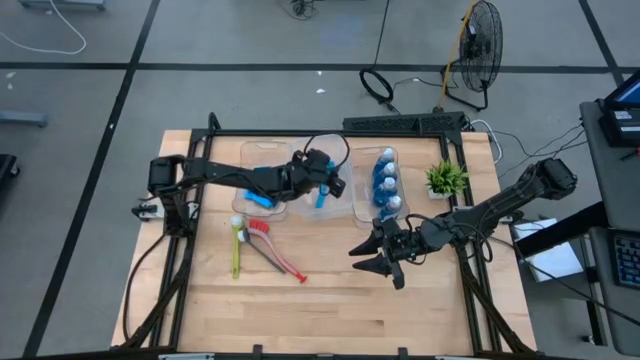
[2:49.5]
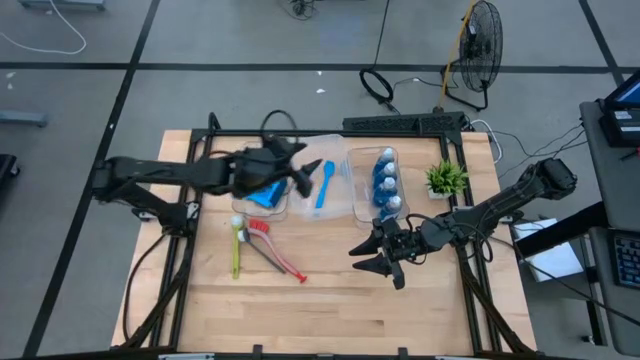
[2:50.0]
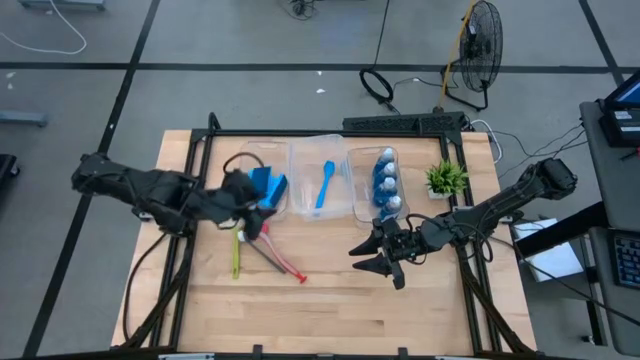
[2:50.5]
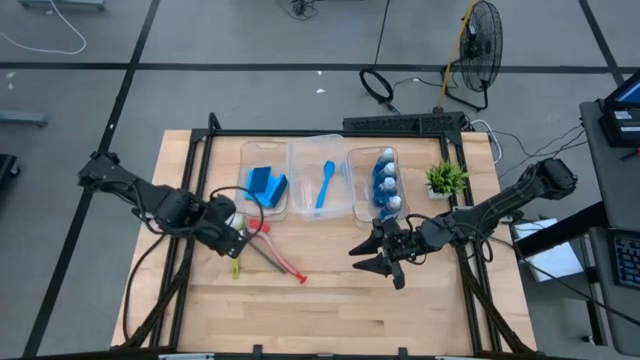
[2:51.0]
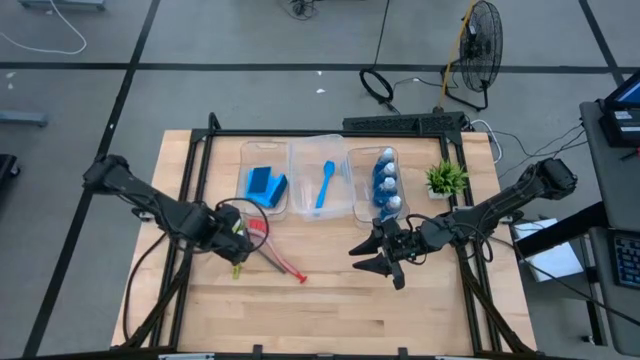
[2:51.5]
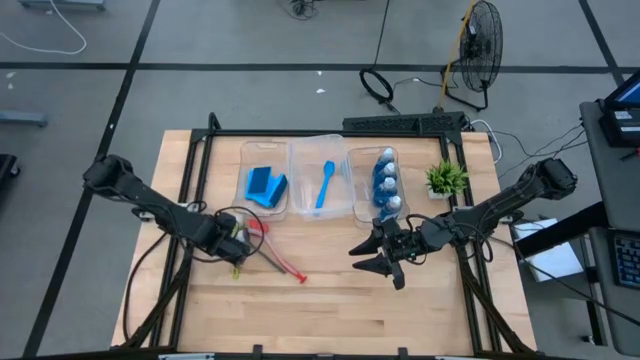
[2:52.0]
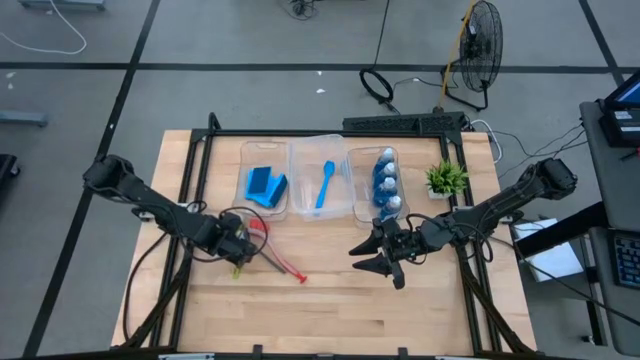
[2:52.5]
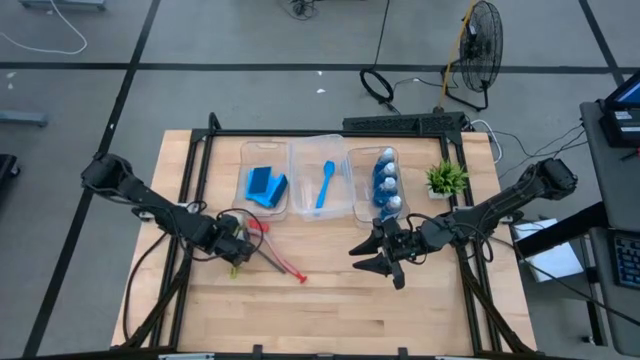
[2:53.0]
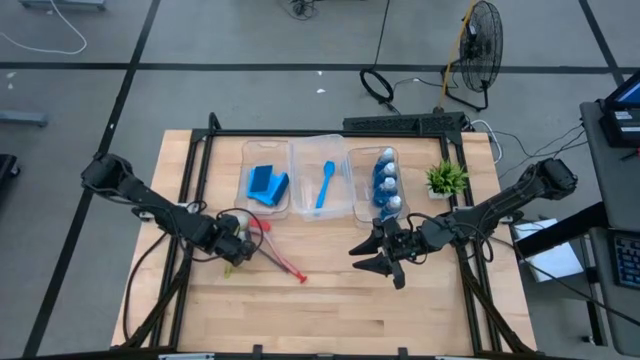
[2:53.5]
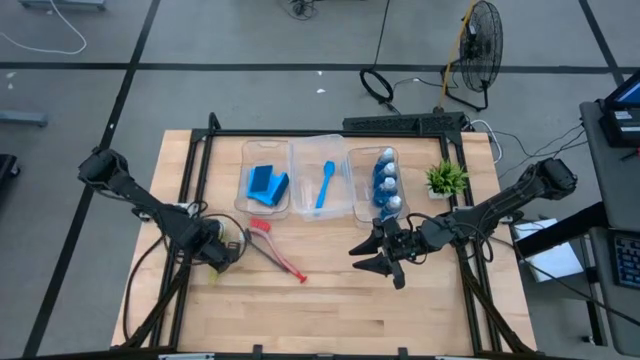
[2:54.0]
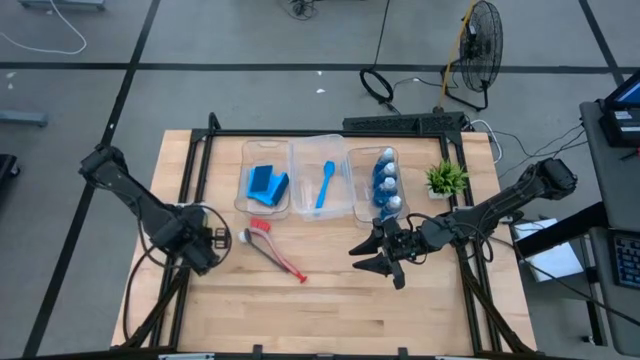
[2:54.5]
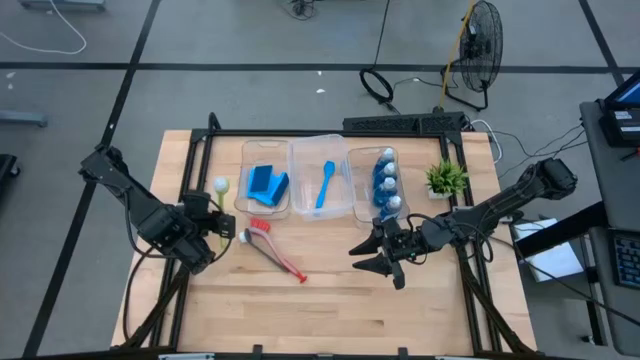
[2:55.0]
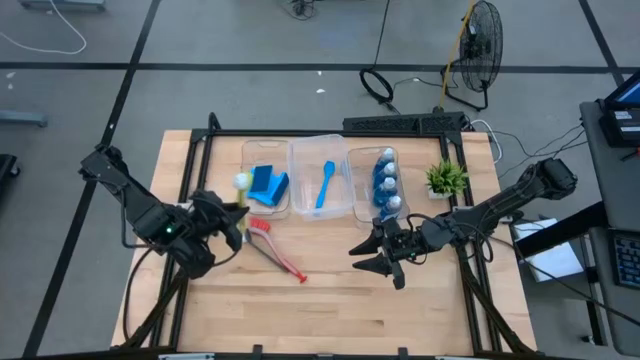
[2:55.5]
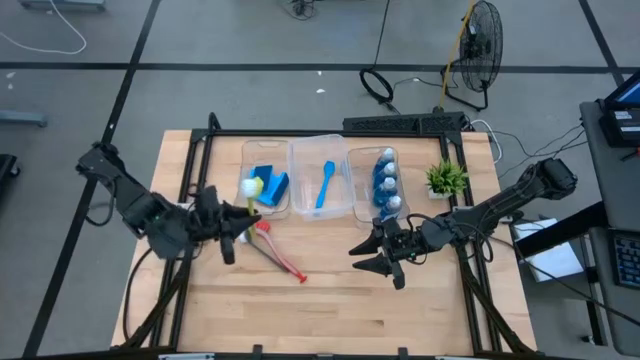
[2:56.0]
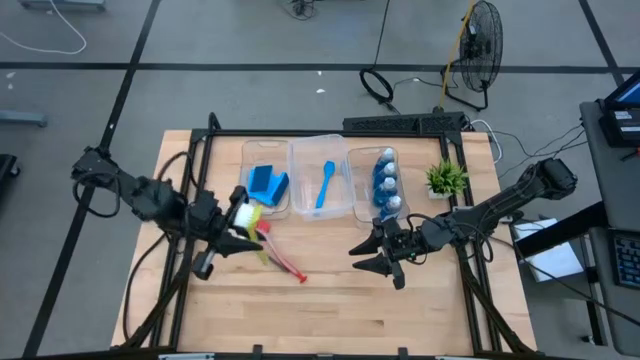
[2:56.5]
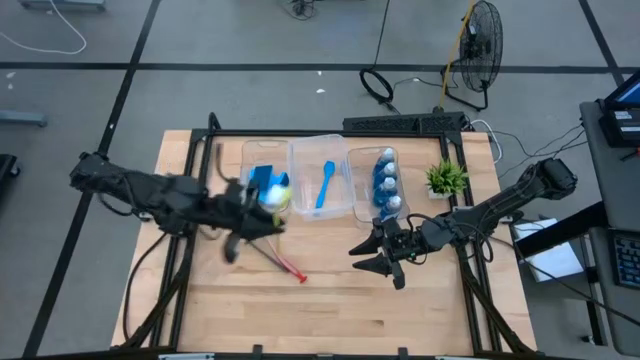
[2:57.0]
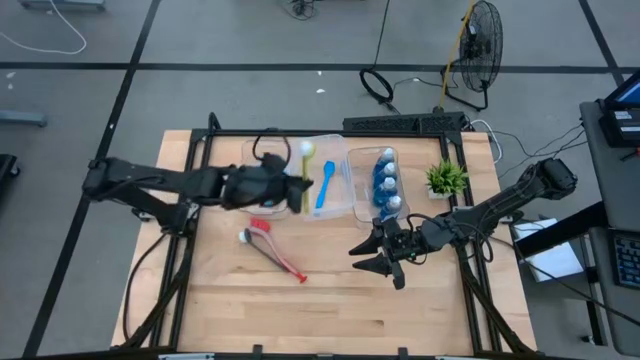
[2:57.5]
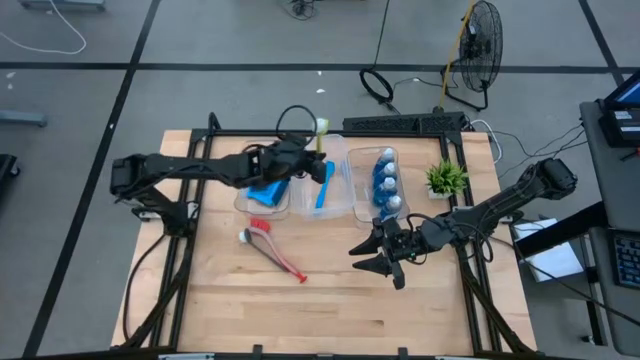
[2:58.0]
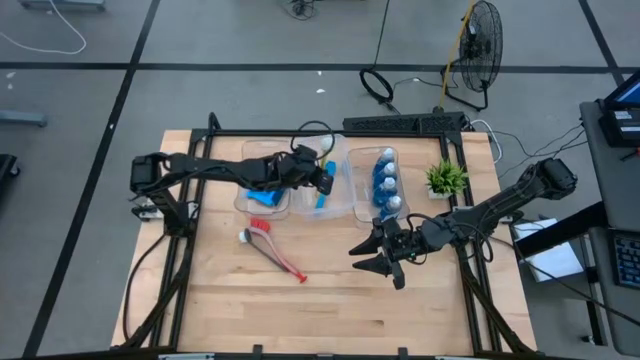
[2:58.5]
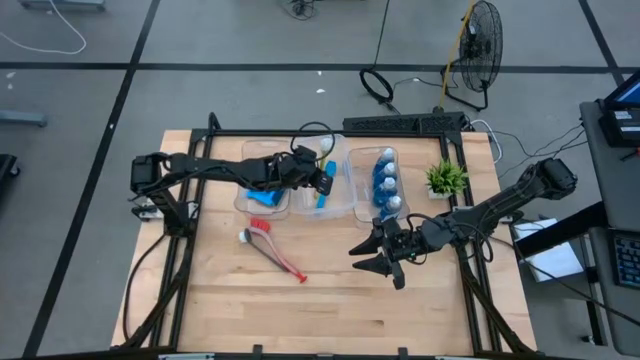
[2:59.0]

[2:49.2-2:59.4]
Task: Pick & Place Kitchen Sink Supplies
Put the green dish brush into the white bin

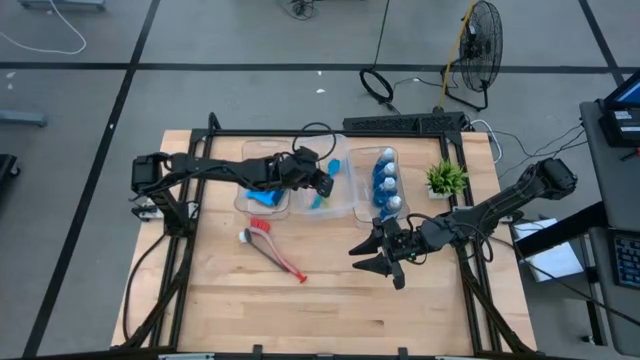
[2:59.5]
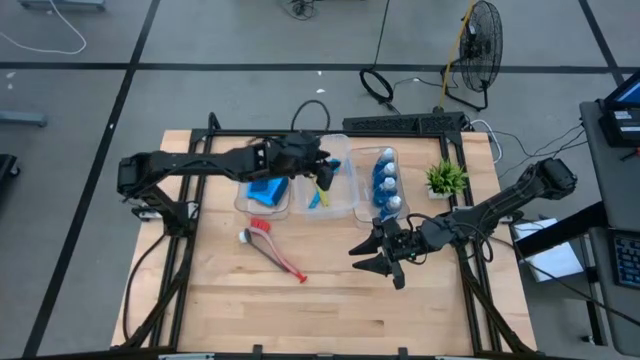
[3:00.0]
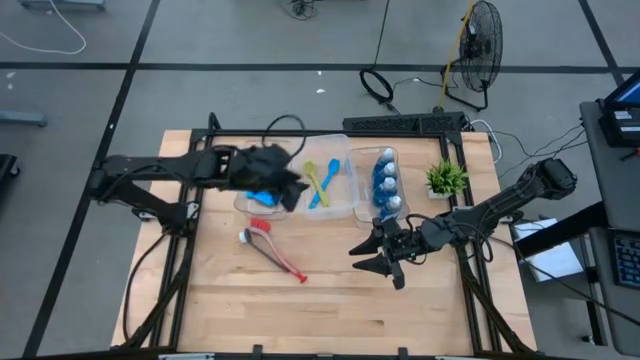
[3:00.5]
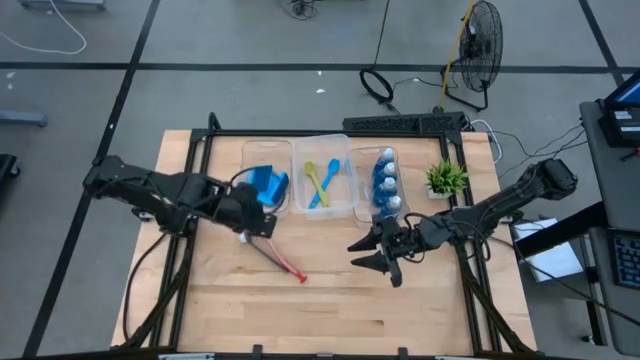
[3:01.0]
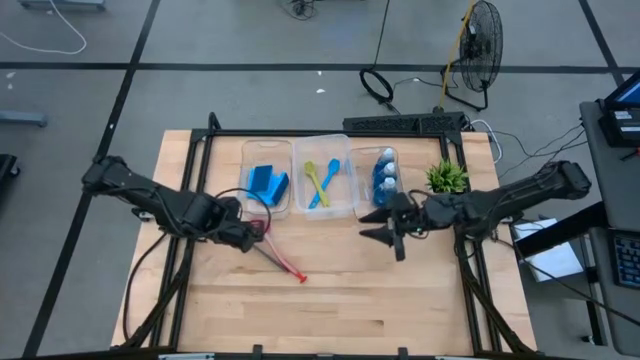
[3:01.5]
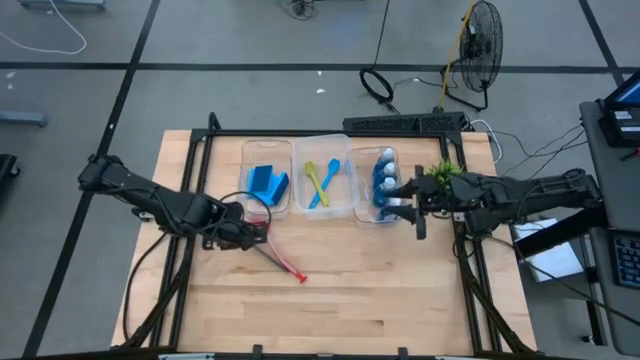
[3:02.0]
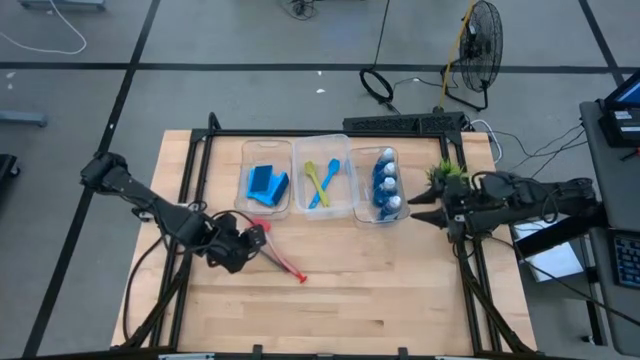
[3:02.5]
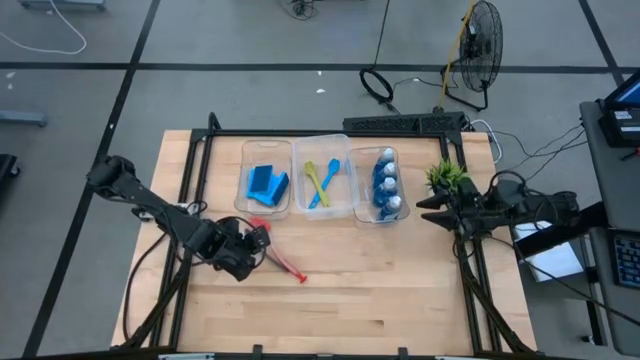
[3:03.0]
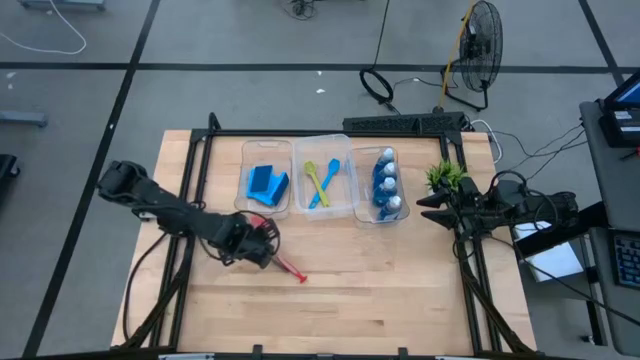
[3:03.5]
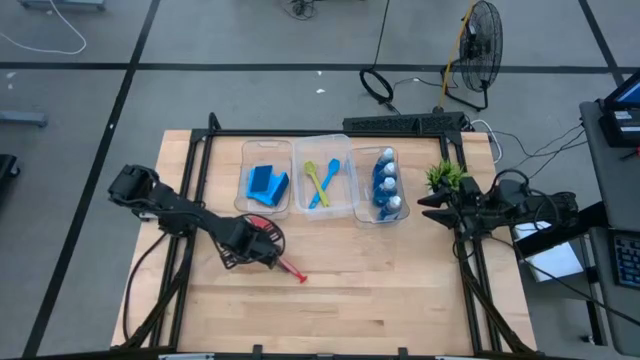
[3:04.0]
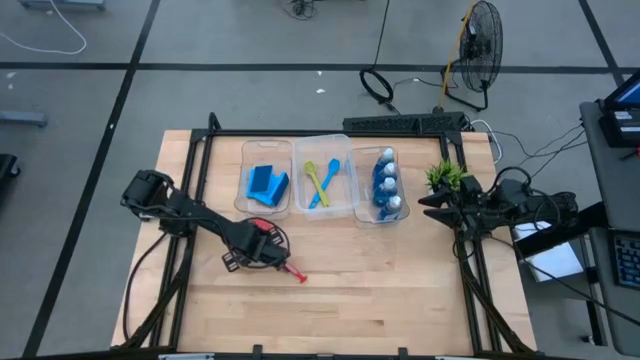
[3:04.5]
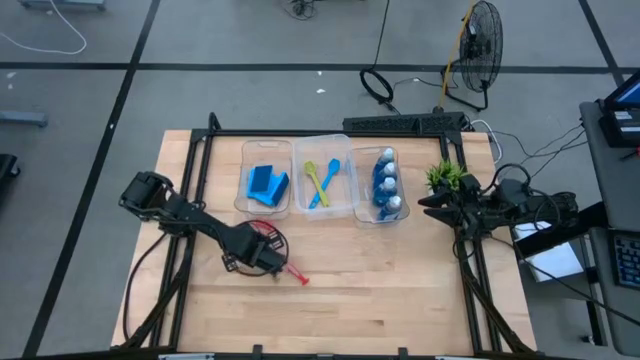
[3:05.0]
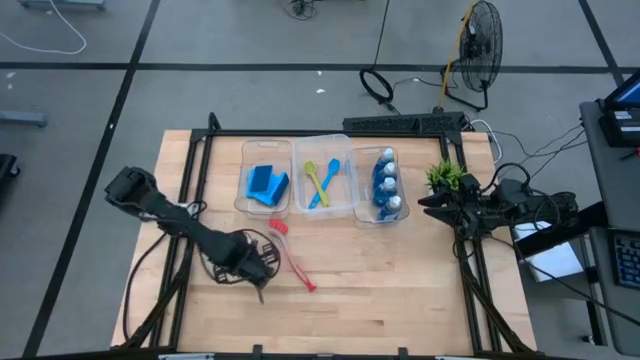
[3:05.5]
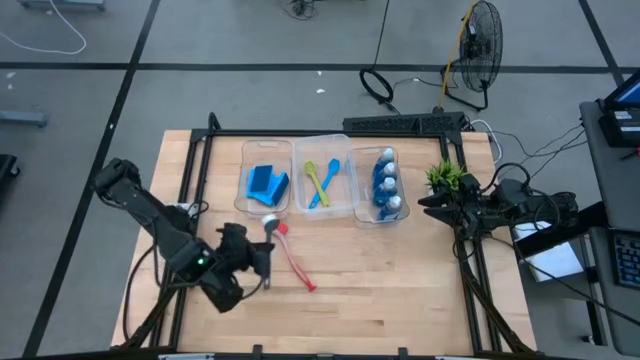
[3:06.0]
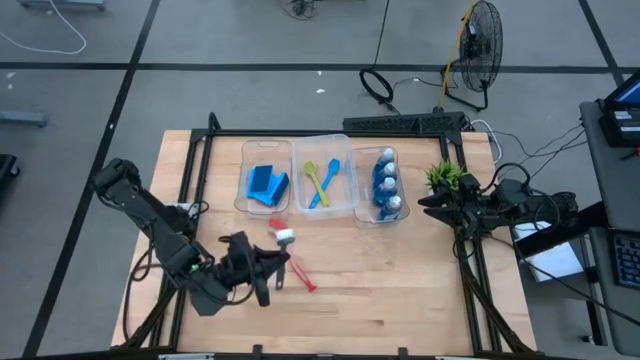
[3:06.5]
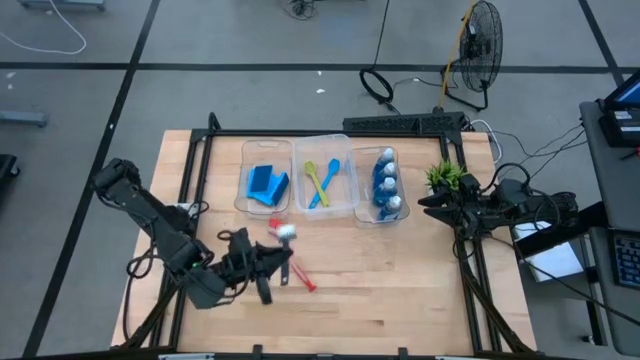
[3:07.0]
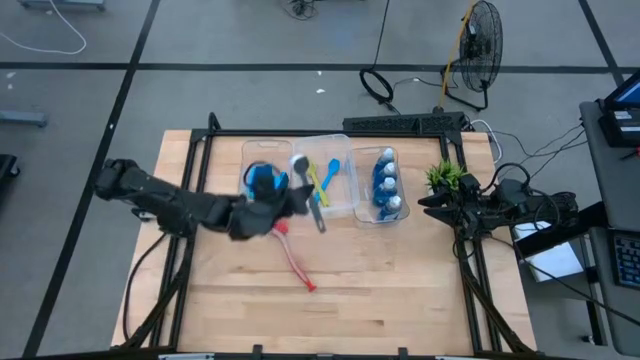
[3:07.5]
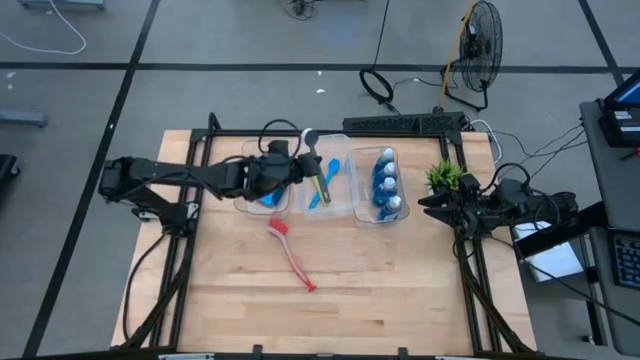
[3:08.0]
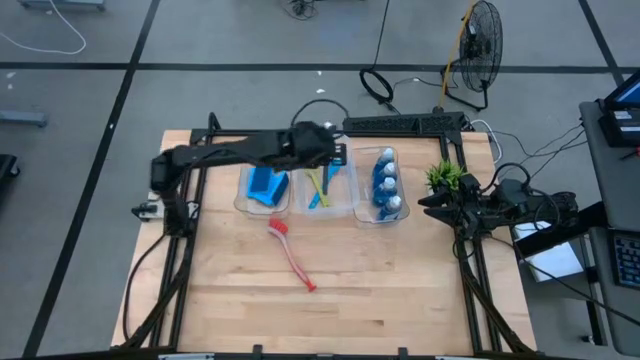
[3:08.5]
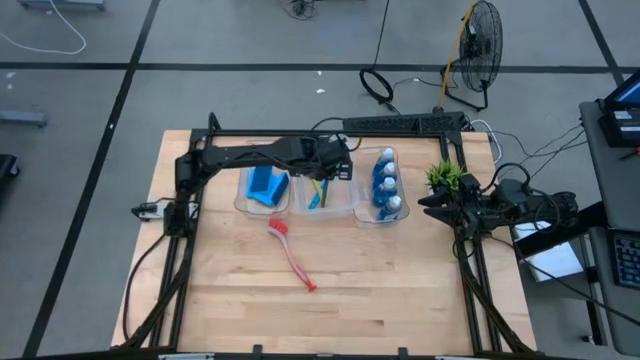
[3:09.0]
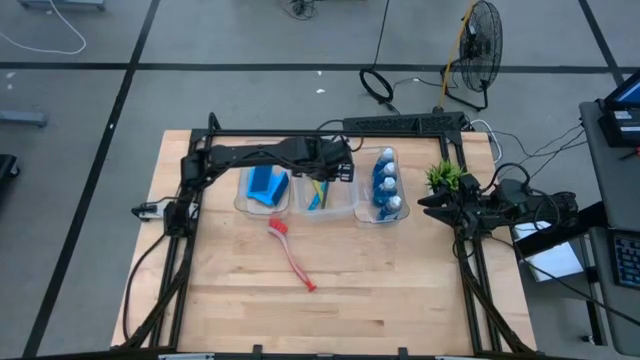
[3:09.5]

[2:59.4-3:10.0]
Put the black dish brush into the white bin
